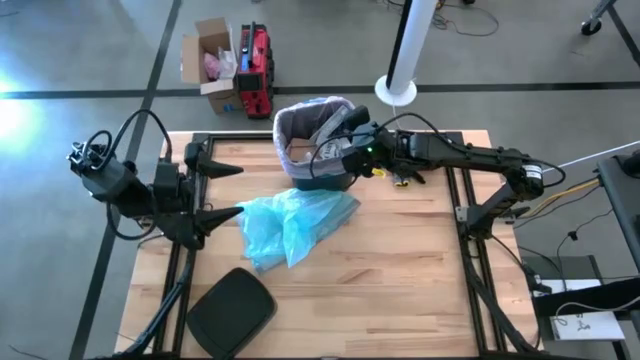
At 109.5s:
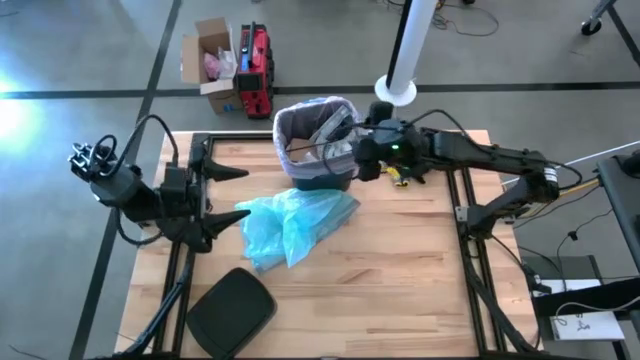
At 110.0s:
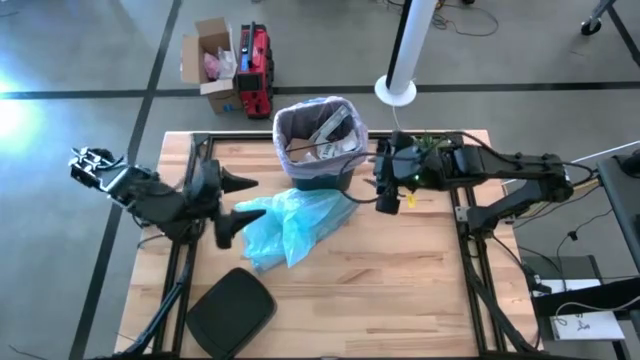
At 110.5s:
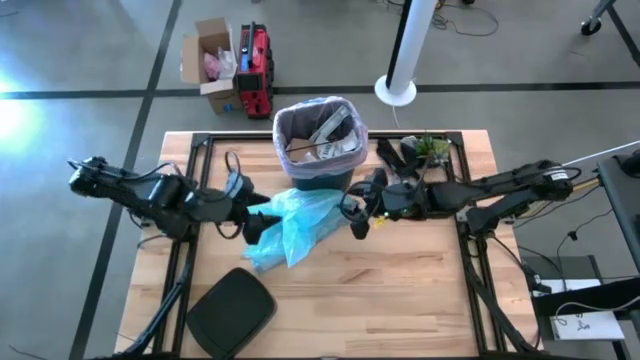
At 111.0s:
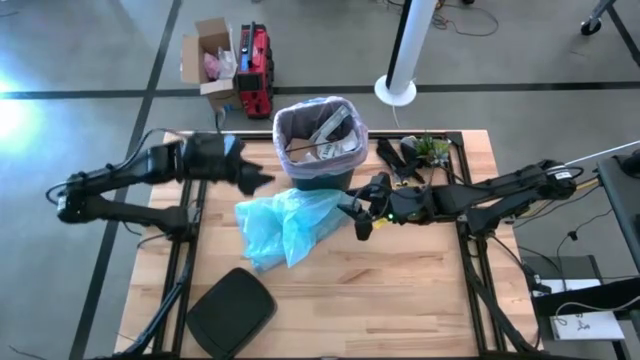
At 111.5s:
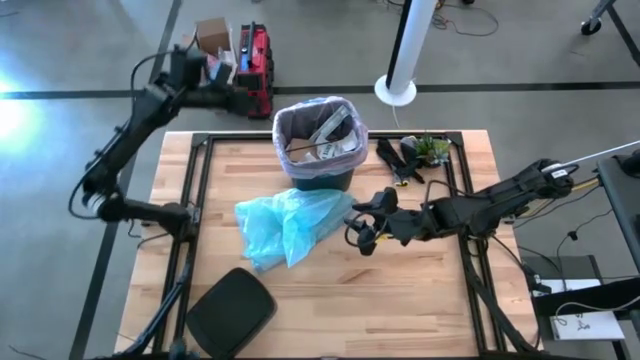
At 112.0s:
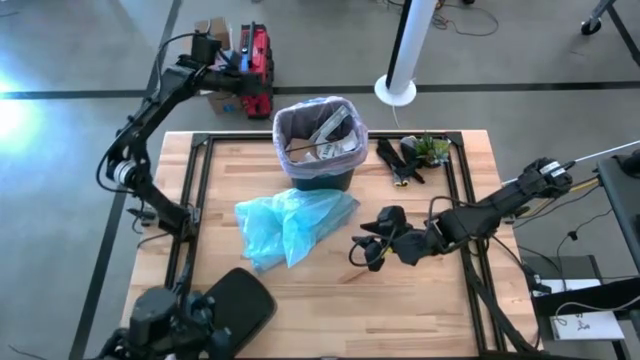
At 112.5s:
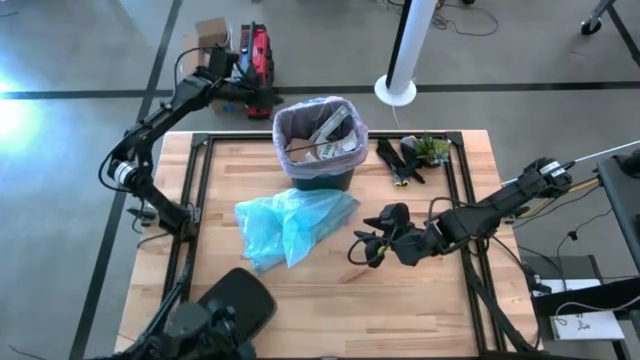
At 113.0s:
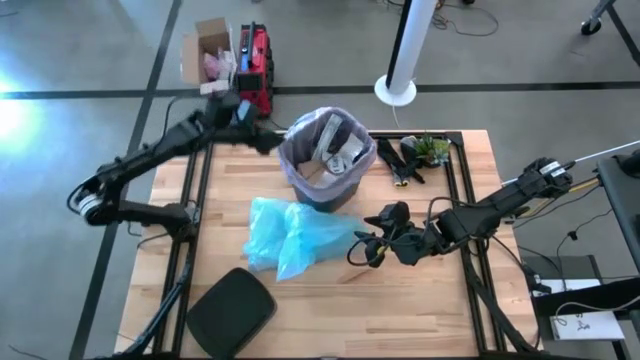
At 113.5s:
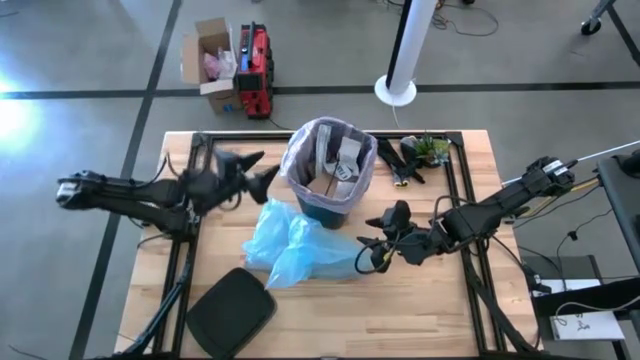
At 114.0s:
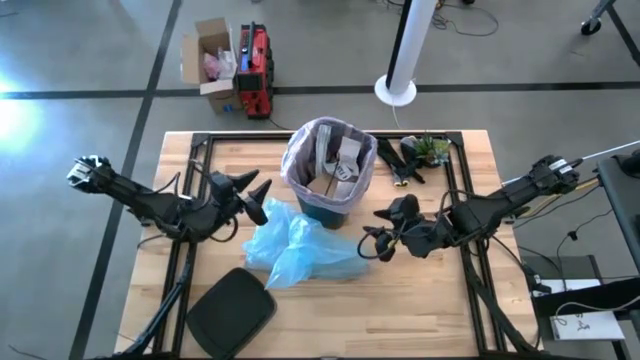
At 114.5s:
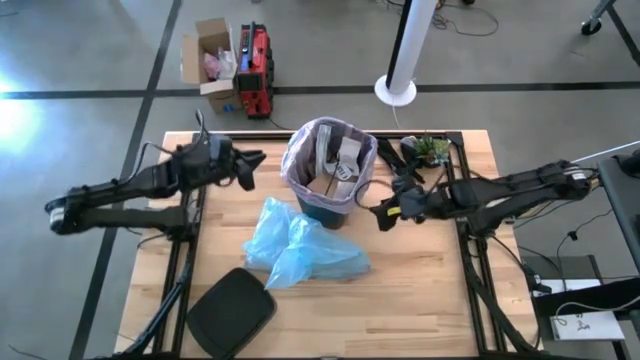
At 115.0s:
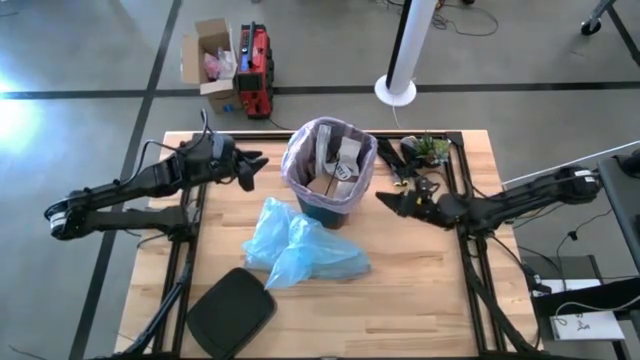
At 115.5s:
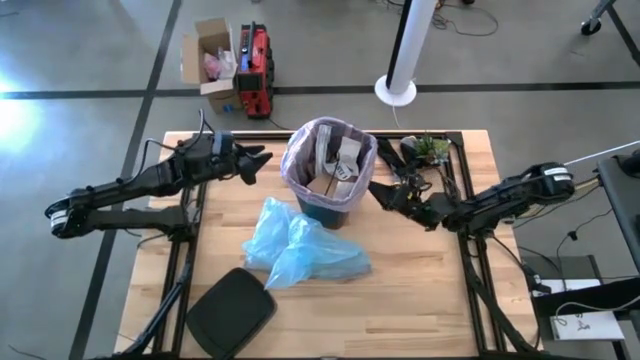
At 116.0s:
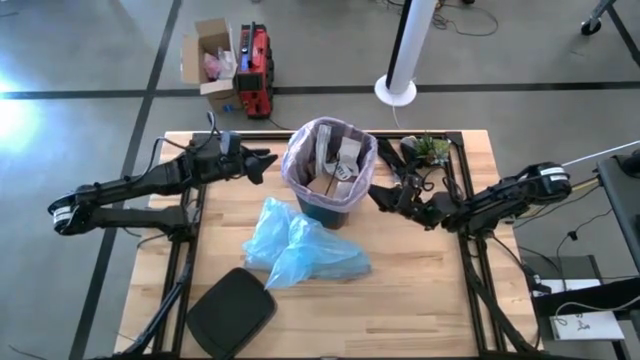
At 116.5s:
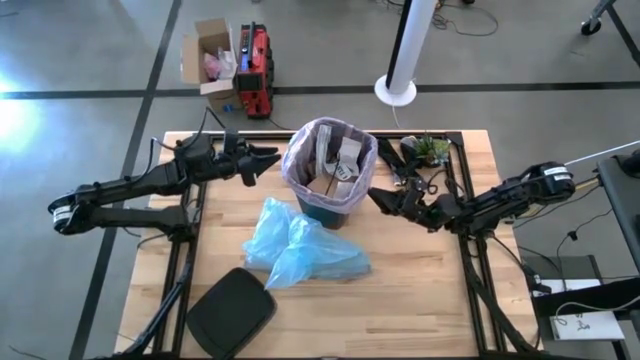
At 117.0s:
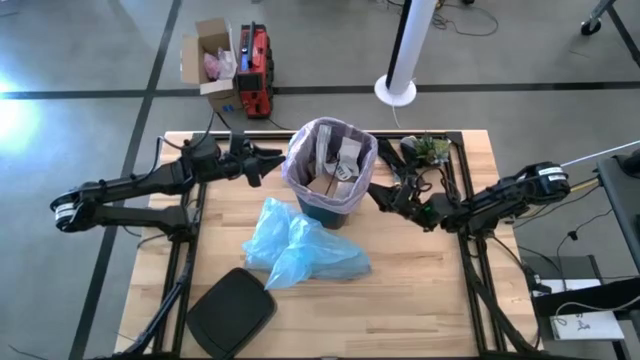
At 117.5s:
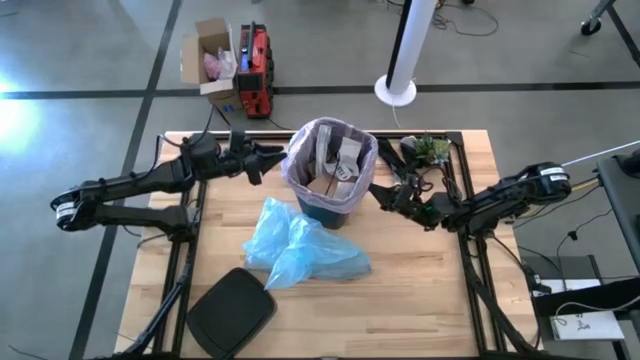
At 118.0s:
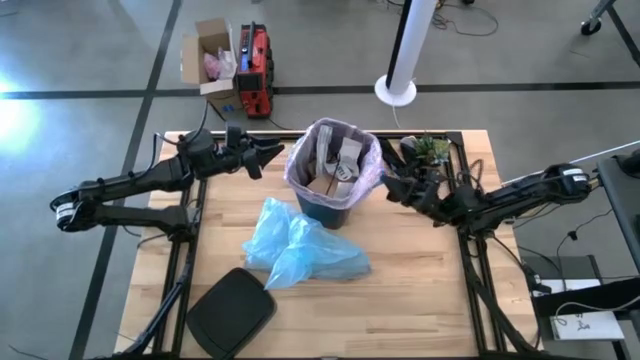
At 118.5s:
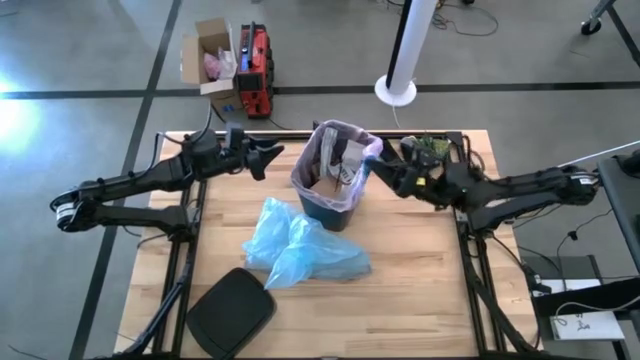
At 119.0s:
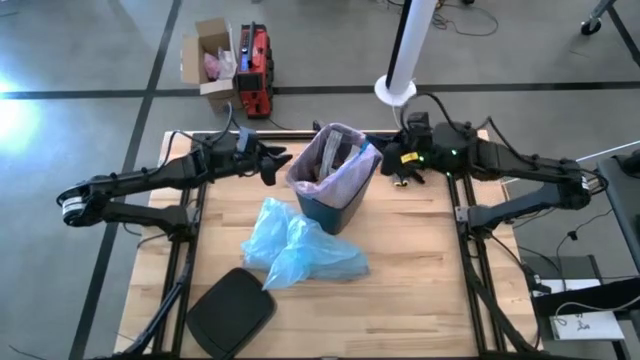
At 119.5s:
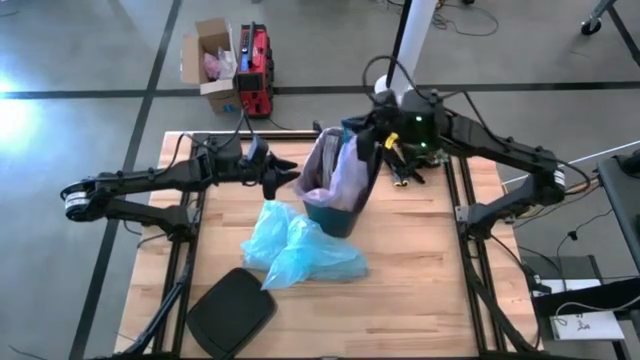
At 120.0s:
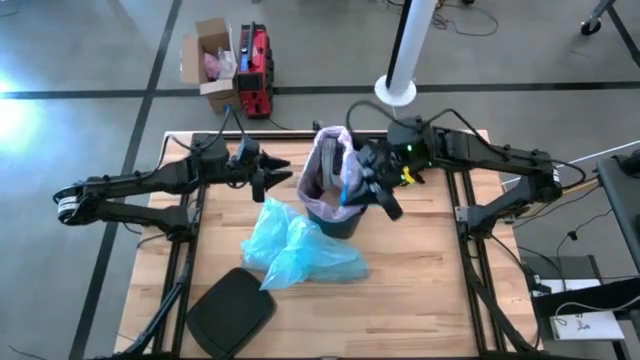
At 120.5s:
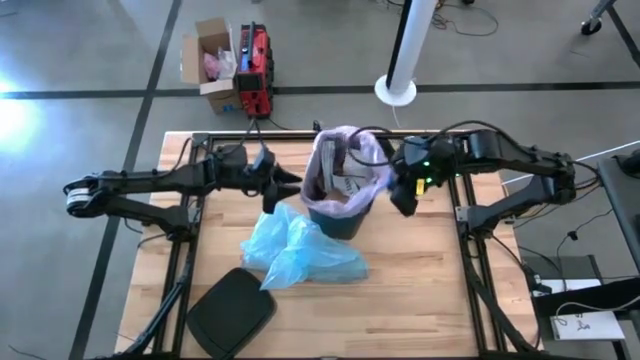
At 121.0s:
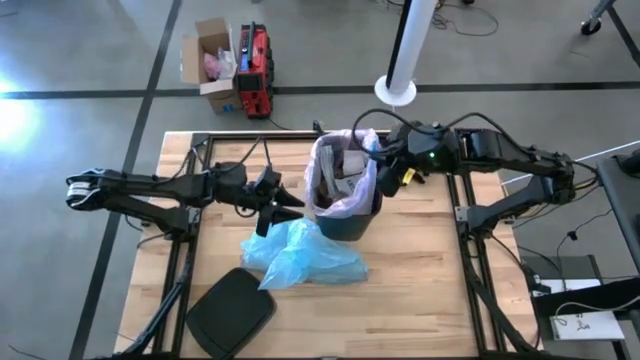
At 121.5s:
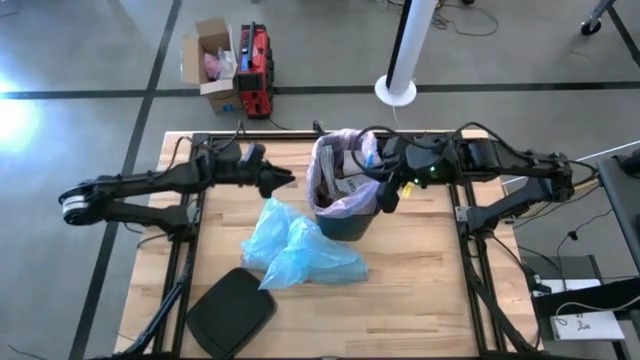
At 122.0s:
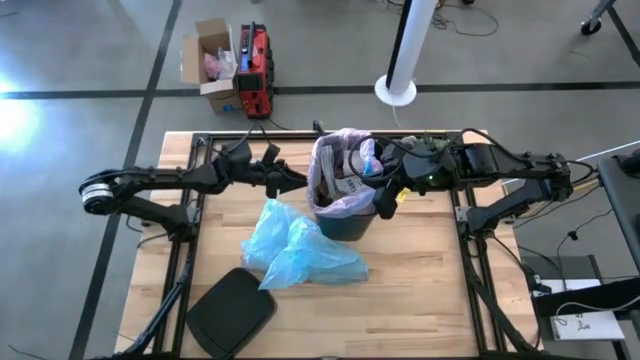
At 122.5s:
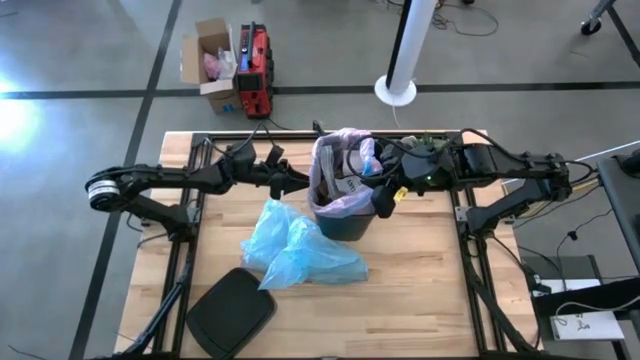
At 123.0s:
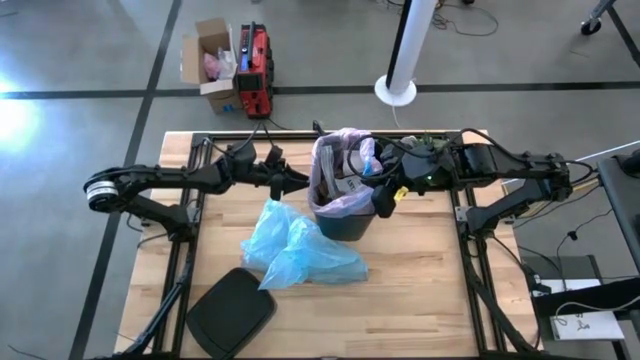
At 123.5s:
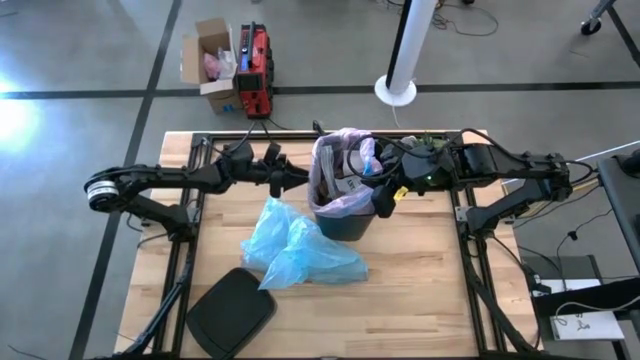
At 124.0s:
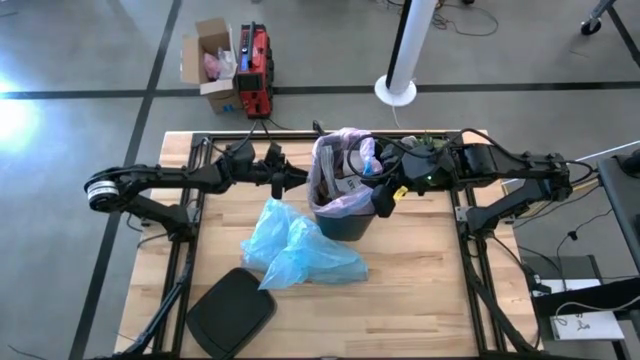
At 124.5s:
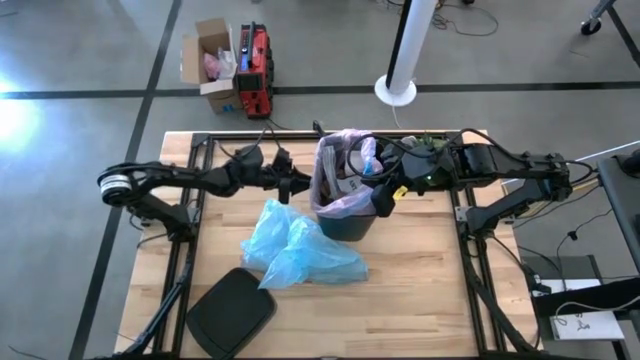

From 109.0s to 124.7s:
Task: place trash/remove bag and relplace
Remove the pink trash bag from the trash bin

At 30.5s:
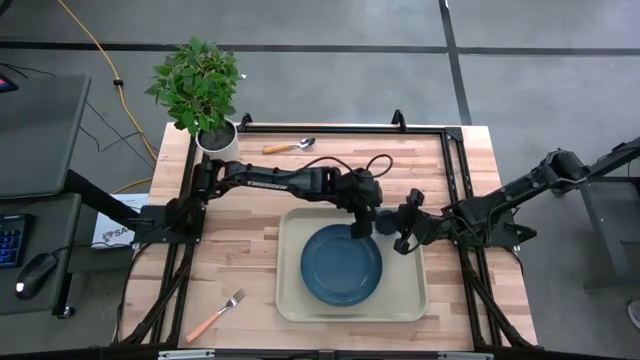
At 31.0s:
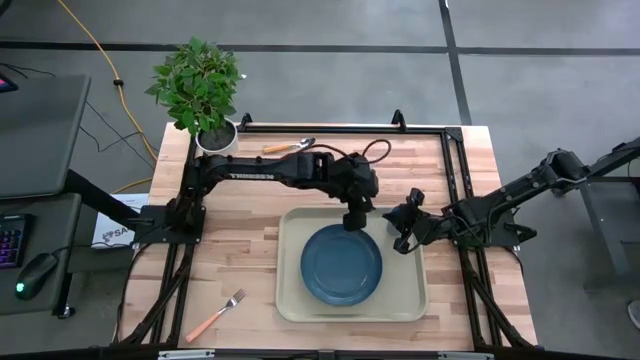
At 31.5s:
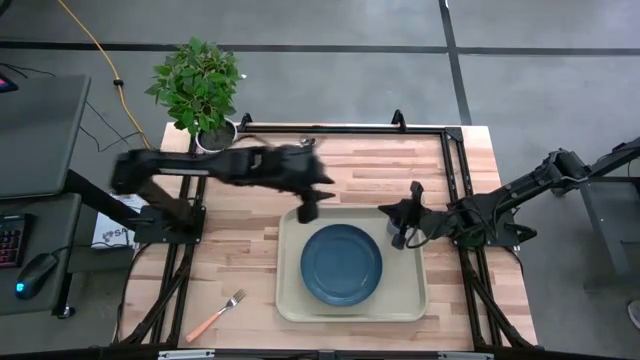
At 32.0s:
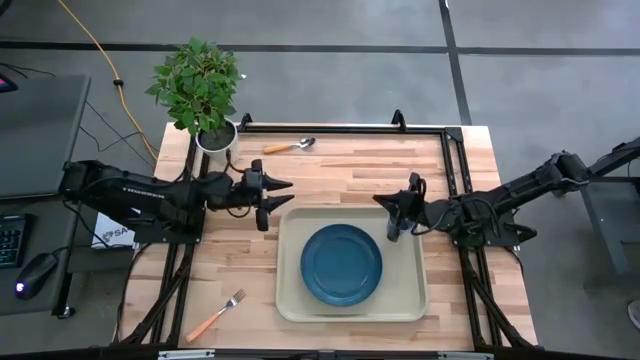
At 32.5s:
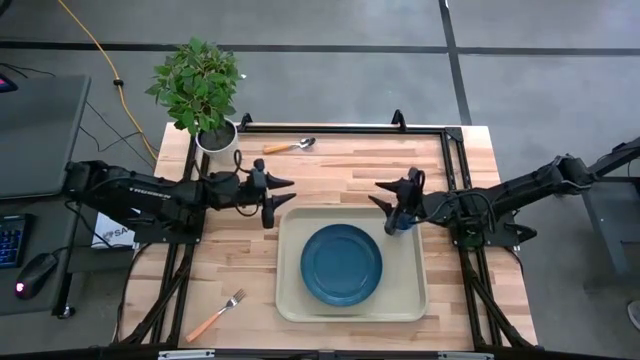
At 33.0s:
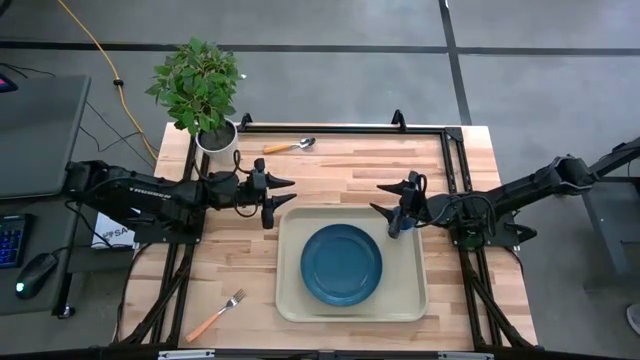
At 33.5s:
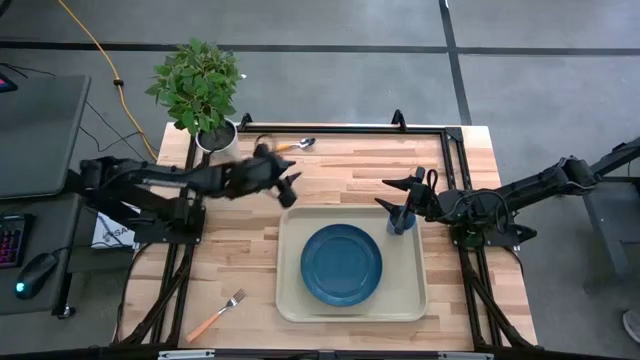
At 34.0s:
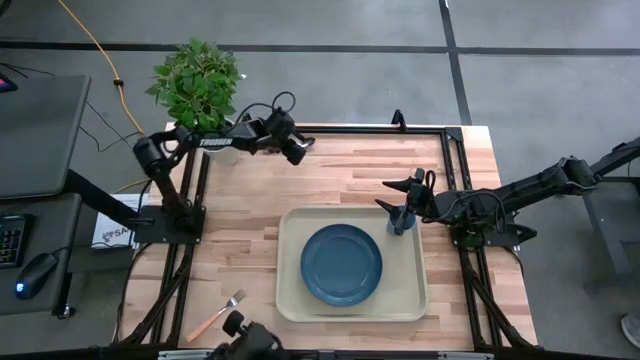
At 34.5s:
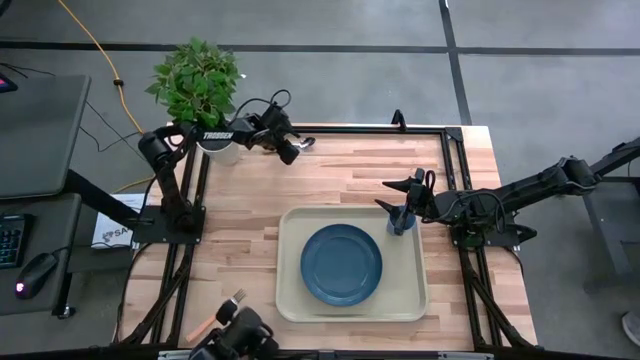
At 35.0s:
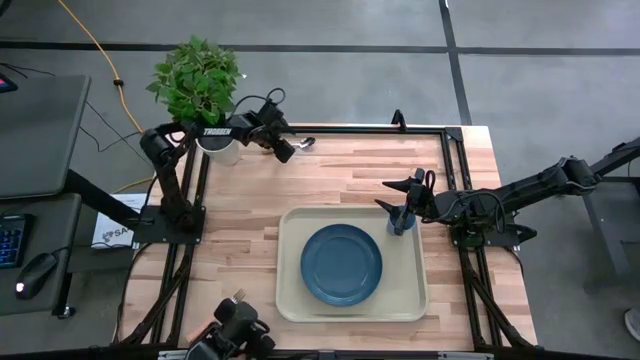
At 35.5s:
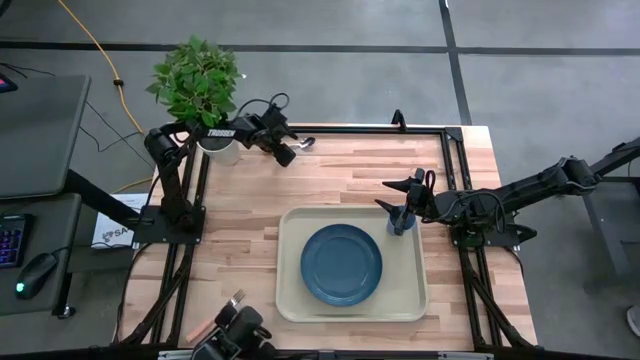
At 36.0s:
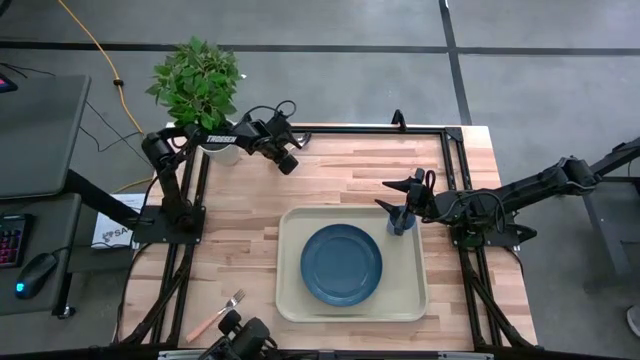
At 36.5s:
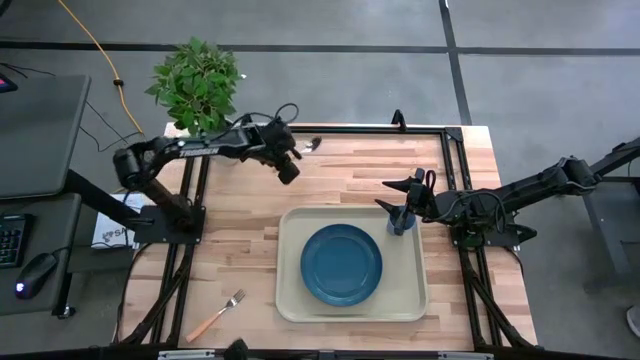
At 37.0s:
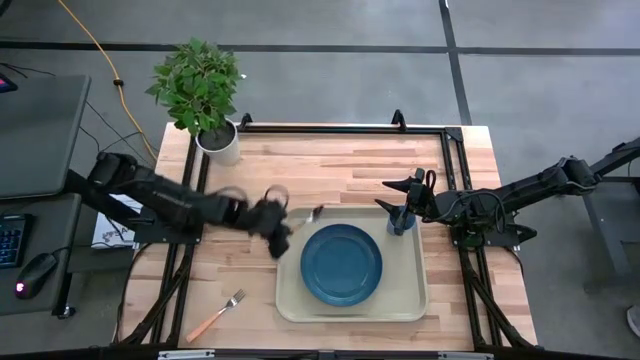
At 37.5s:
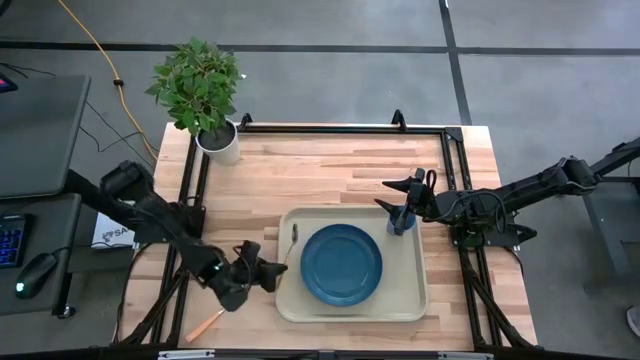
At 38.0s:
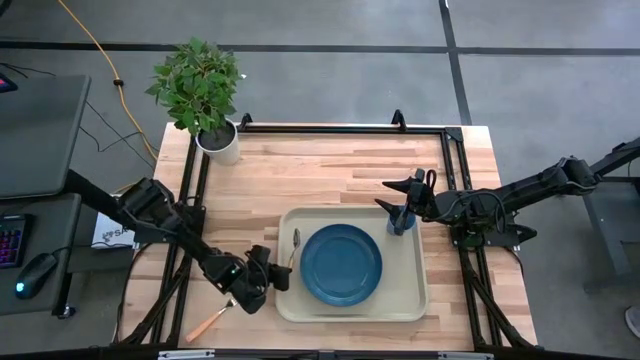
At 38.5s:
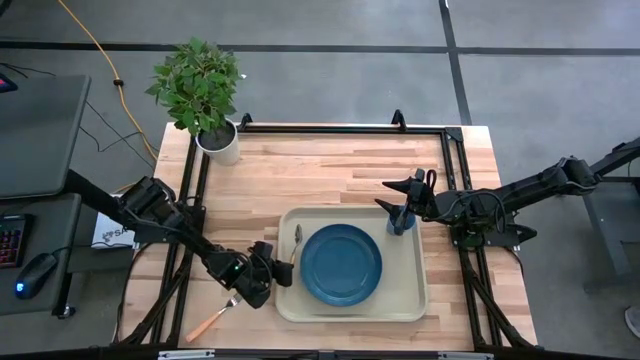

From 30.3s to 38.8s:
Task: Pick and place plate/cup/fork/spoon on tray
Put the yellow spoon on the white serving tray to the left of the blue plate
